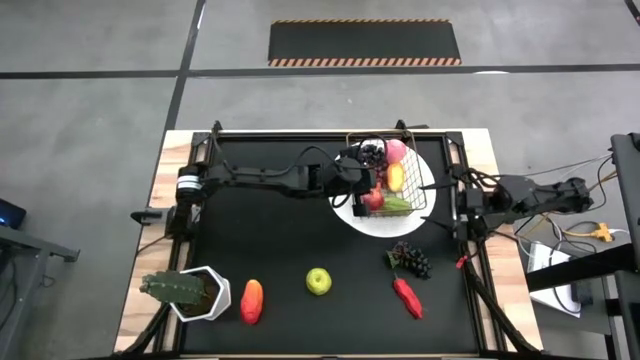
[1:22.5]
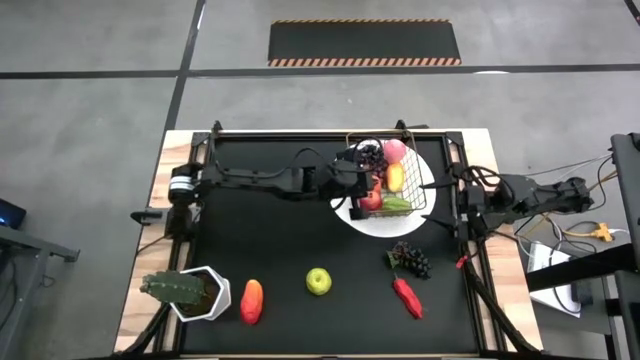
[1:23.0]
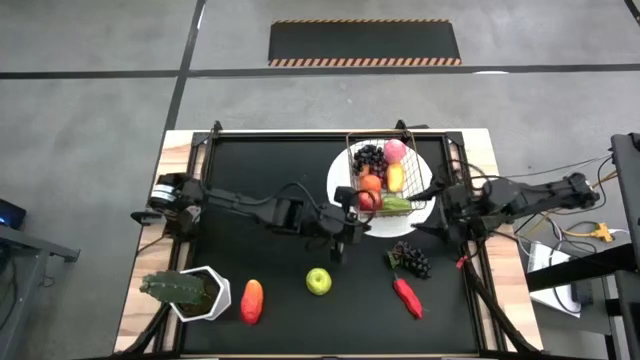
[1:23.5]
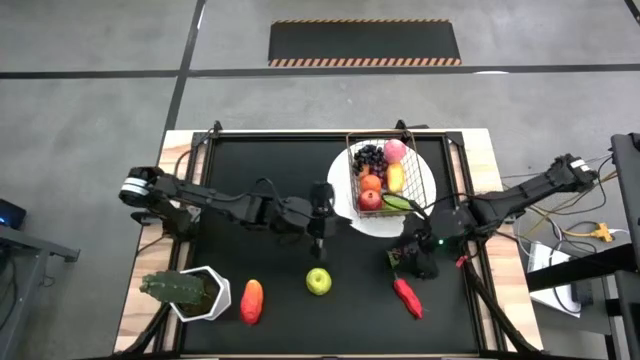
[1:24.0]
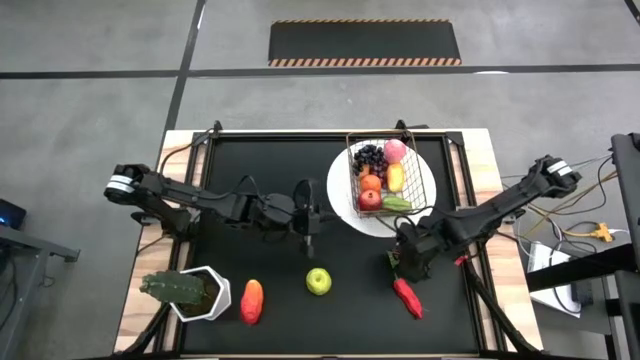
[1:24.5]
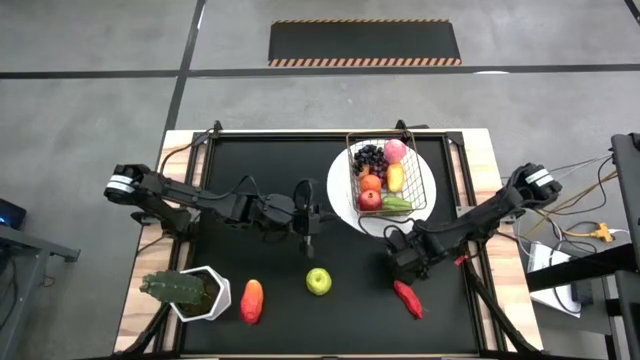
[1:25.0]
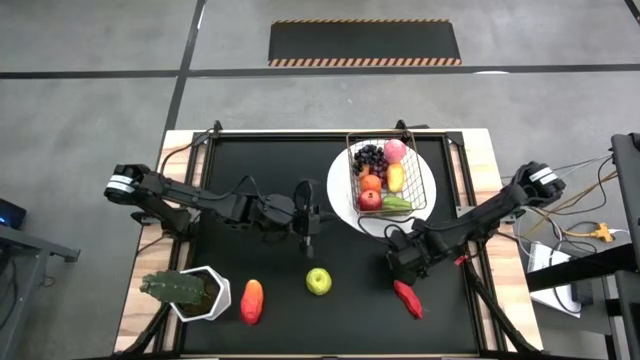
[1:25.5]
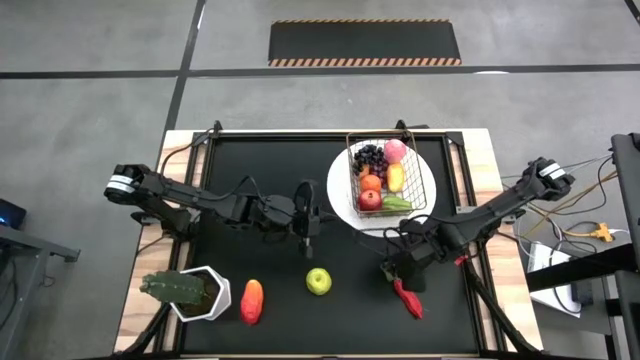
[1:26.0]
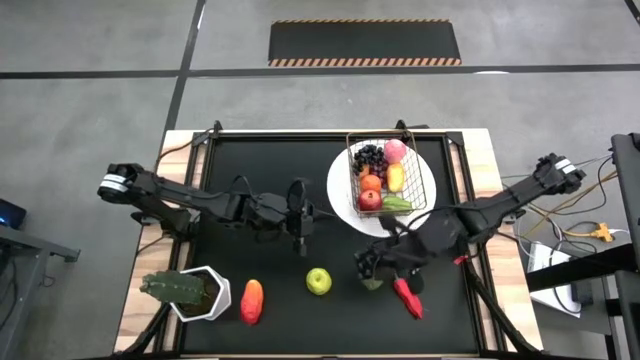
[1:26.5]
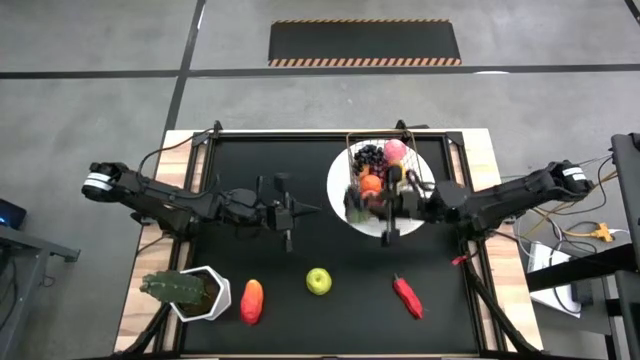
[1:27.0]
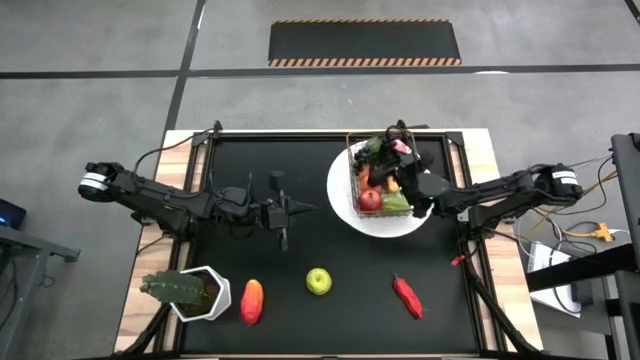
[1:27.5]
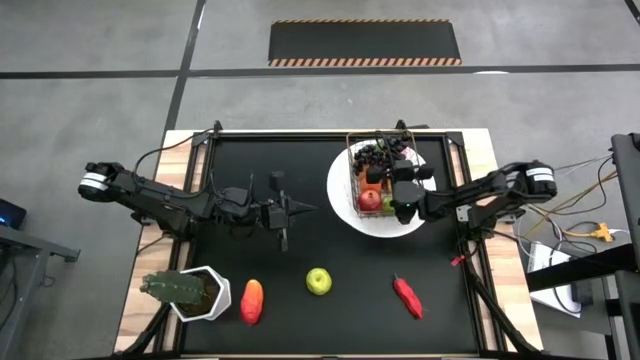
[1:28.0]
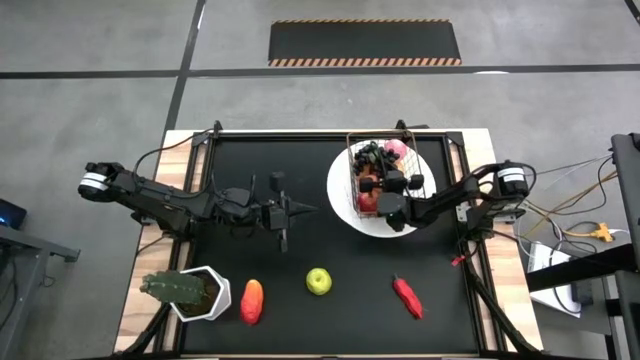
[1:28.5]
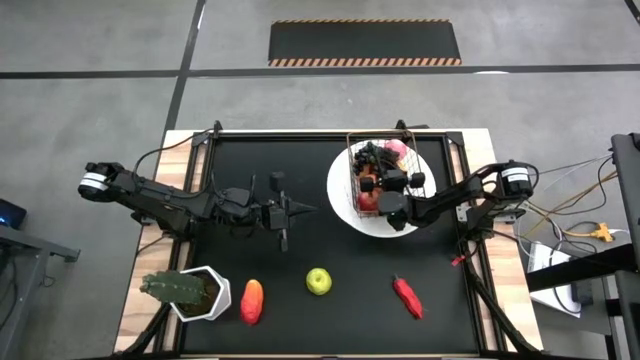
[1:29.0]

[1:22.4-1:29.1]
Task: Build produce basket
Put the black grapes into the wire basket

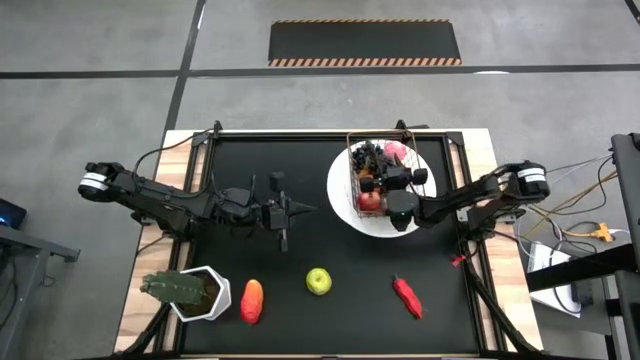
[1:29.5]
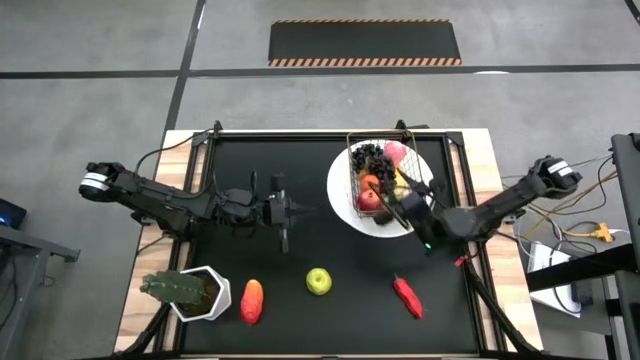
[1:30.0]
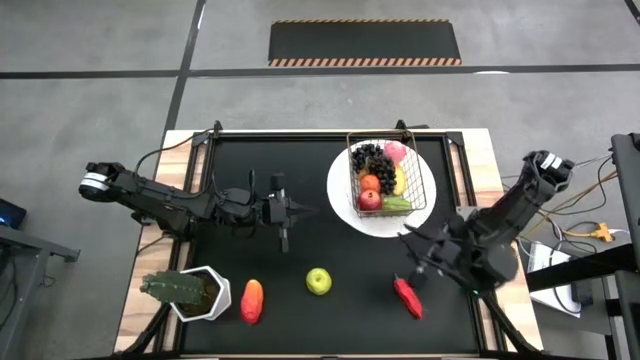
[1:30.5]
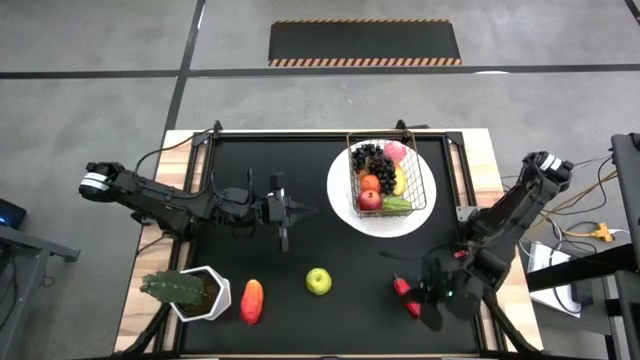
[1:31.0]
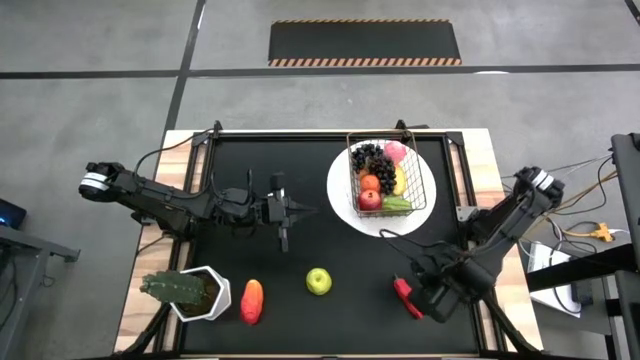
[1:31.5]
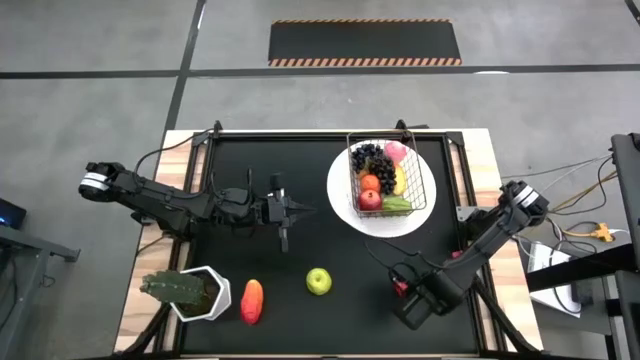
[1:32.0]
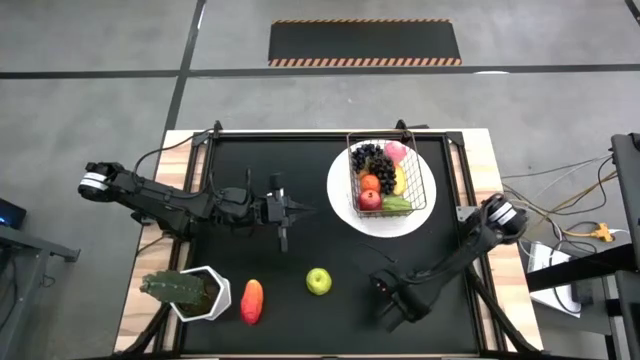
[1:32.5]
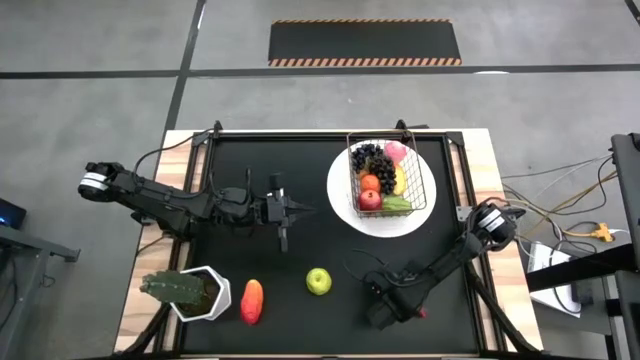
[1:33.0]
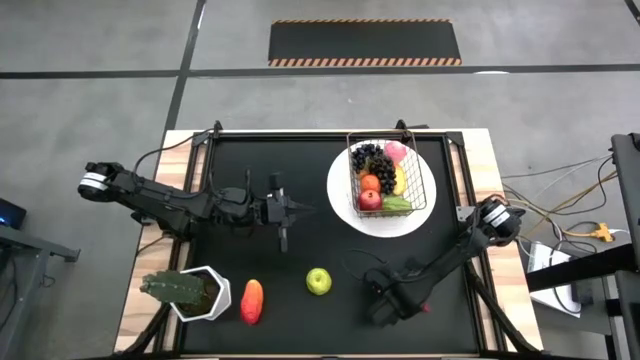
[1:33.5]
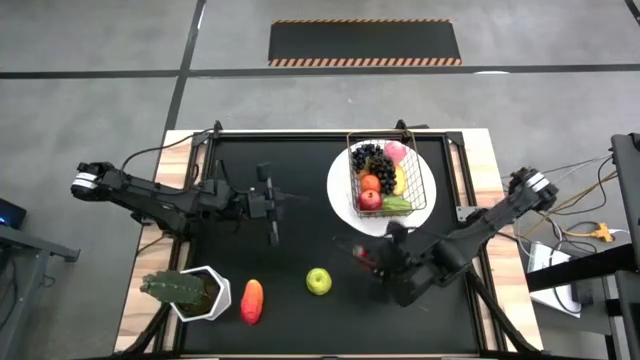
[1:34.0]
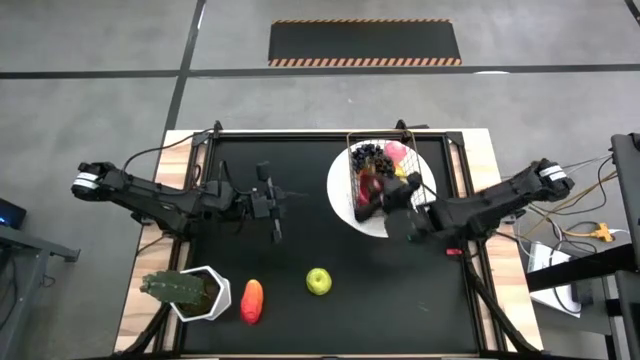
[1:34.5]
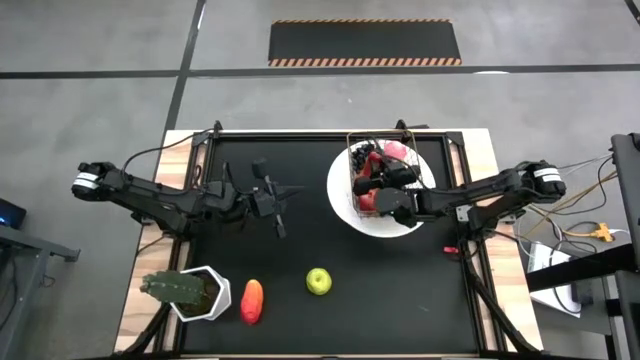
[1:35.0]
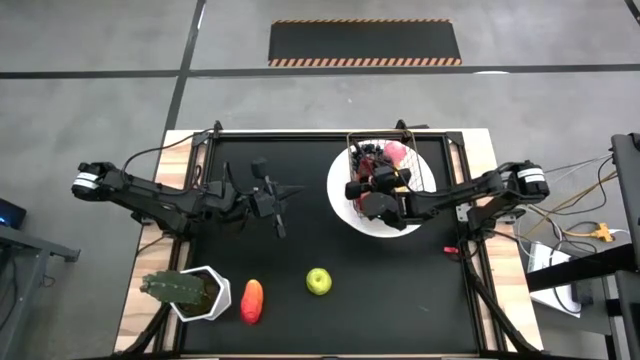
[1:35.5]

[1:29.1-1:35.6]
Put the red chili pepper into the wire basket

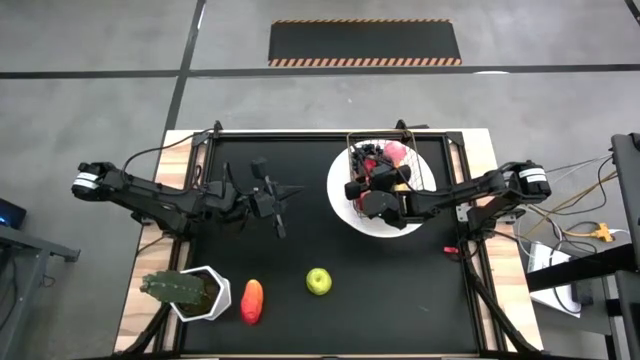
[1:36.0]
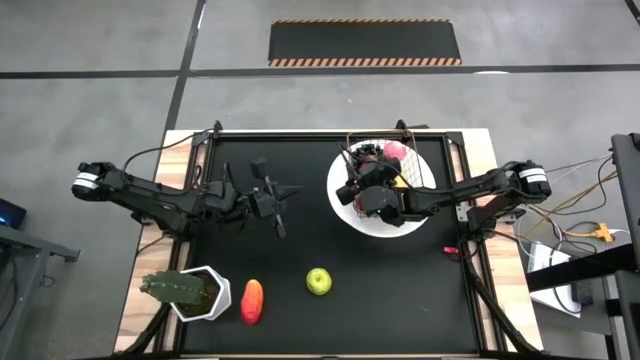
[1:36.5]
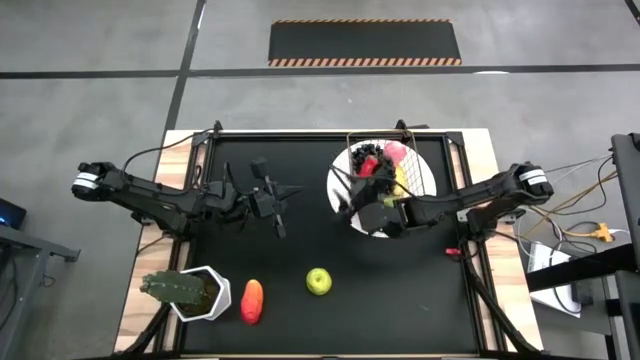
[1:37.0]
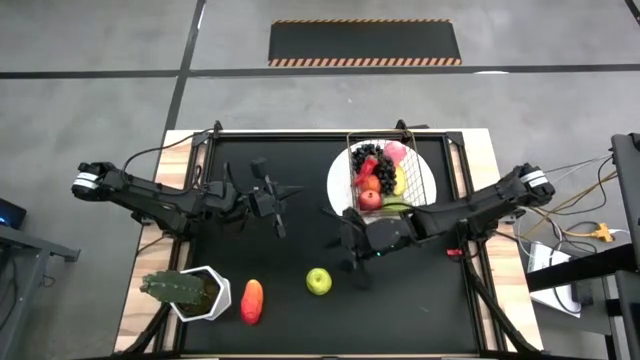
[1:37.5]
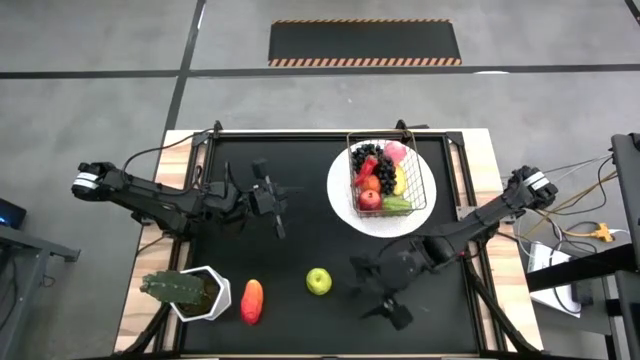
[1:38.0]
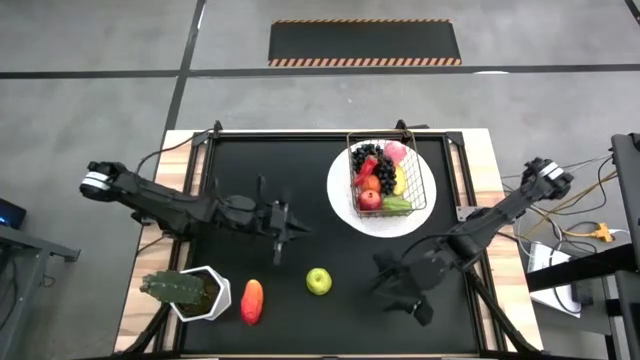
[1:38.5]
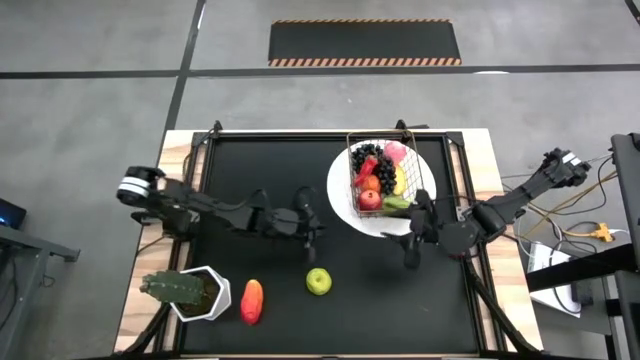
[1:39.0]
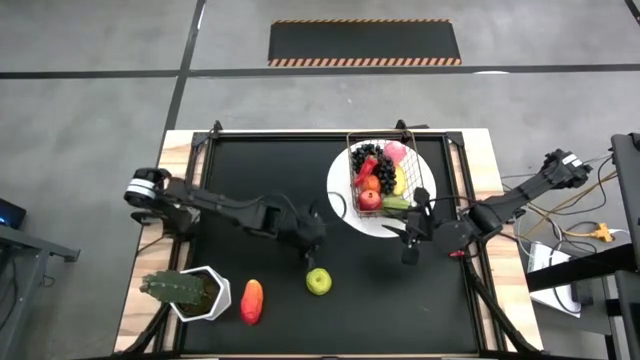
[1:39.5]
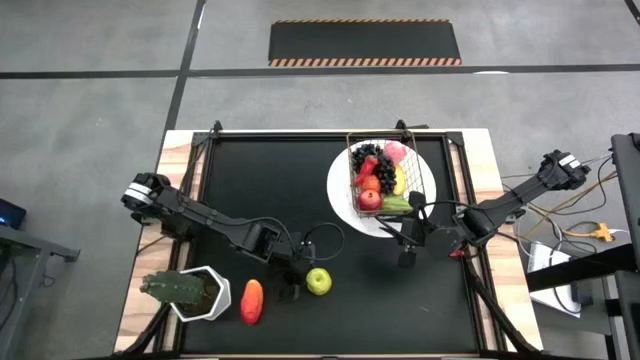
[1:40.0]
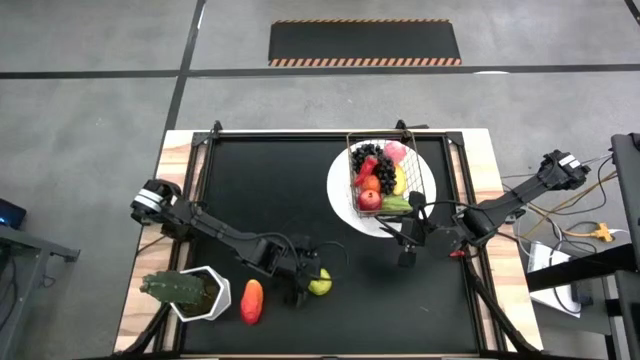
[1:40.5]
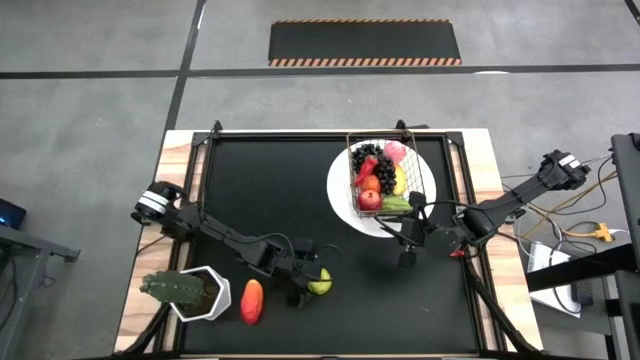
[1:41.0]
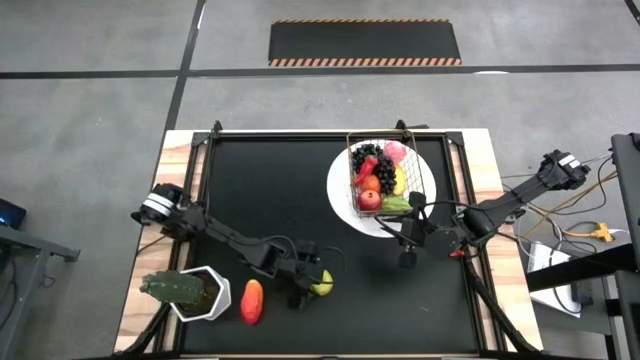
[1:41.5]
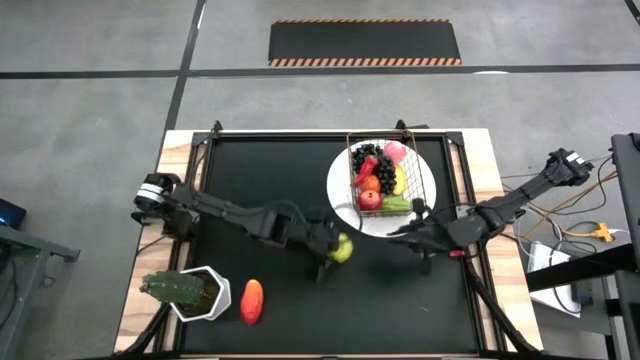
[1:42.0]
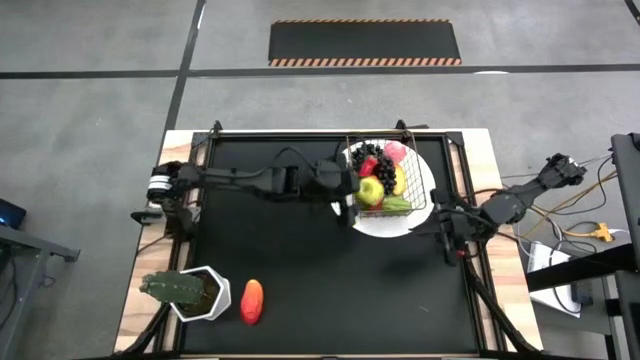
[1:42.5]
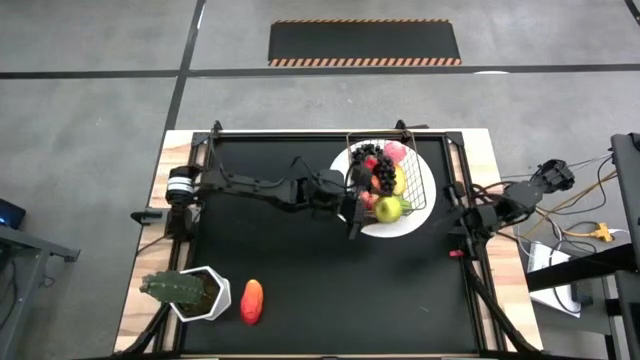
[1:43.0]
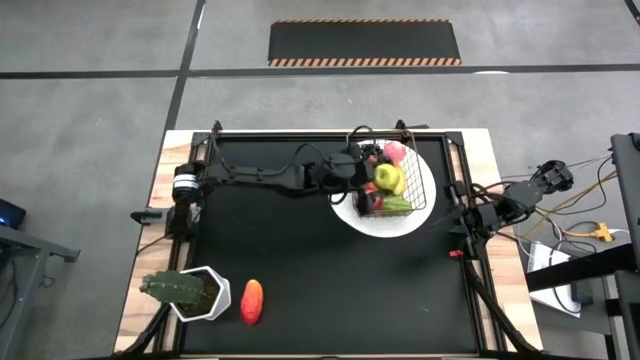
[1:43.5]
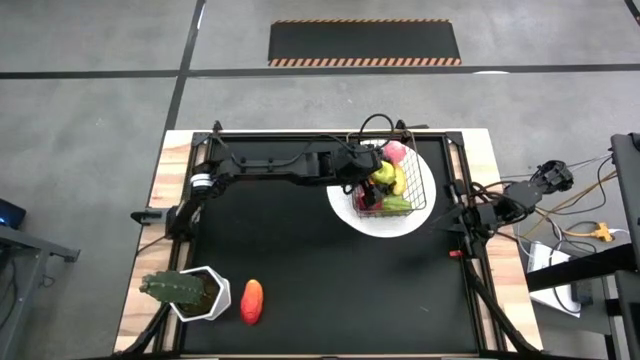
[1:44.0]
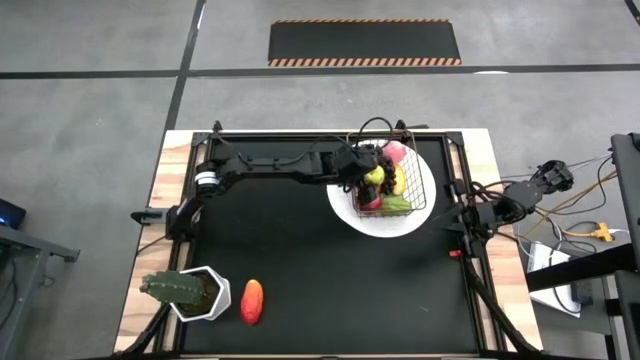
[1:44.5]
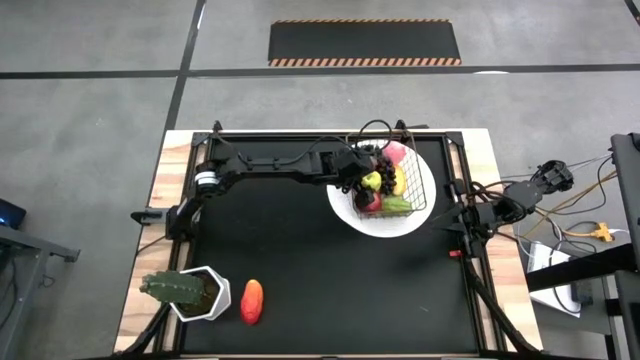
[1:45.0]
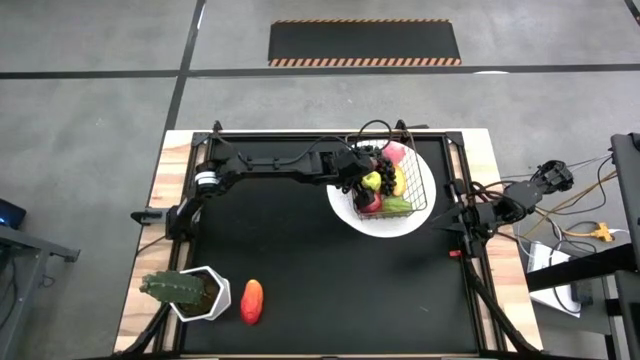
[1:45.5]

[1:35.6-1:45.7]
Put the green apple into the wire basket
